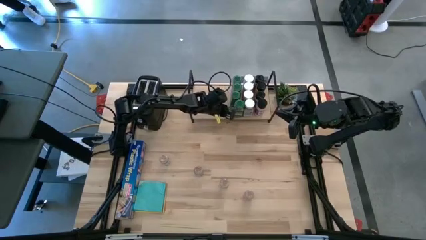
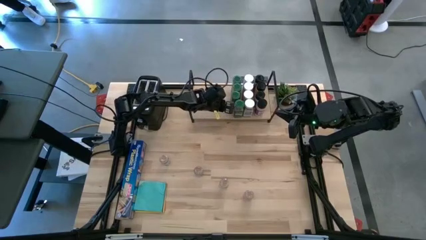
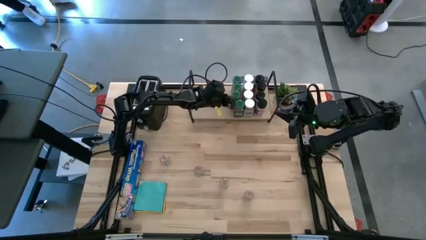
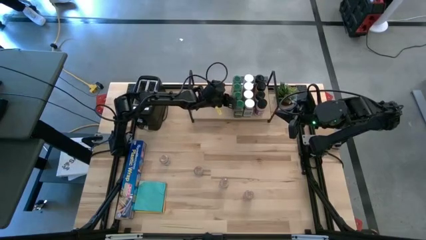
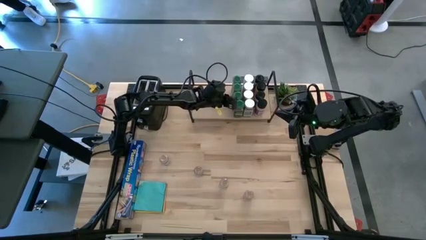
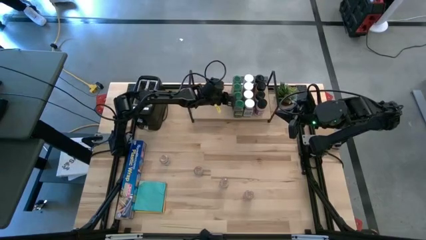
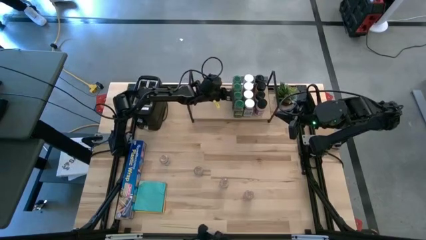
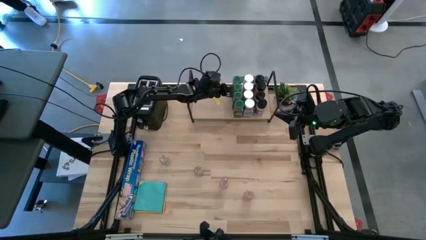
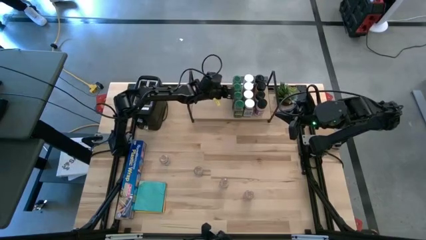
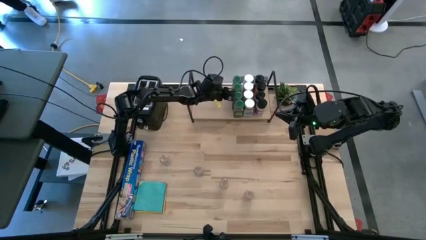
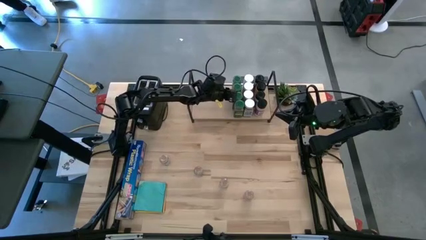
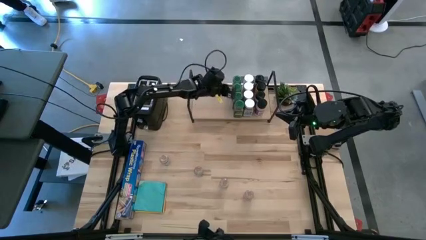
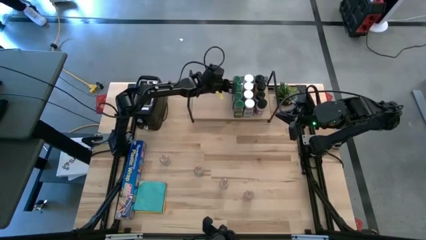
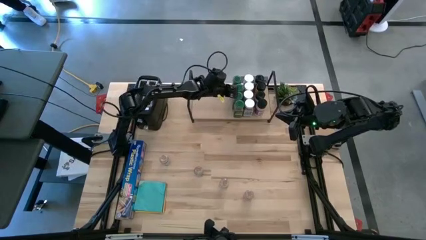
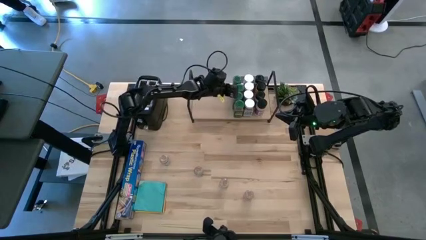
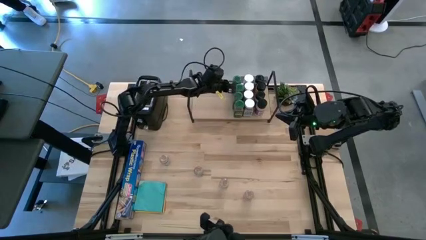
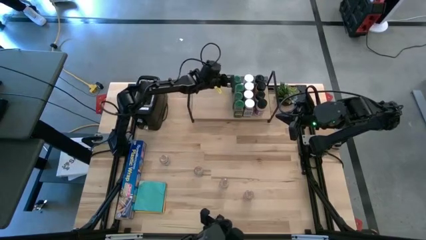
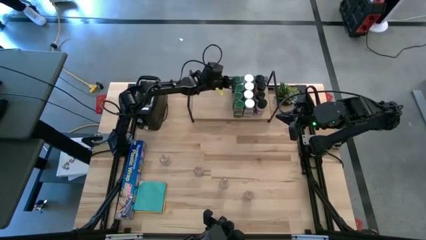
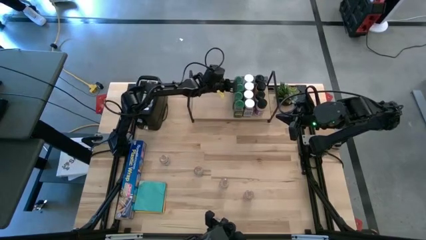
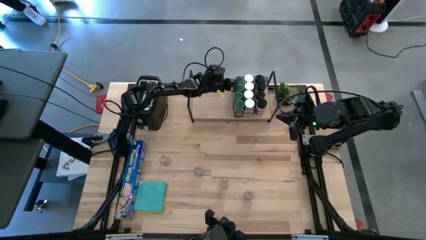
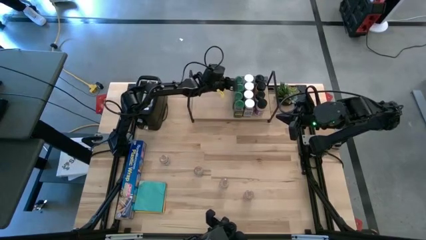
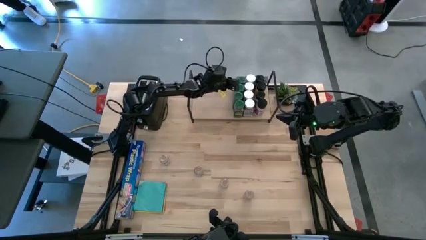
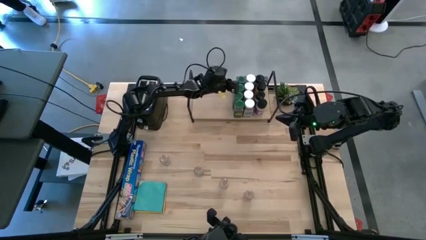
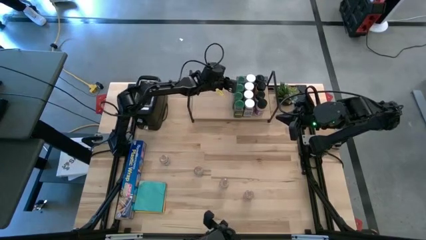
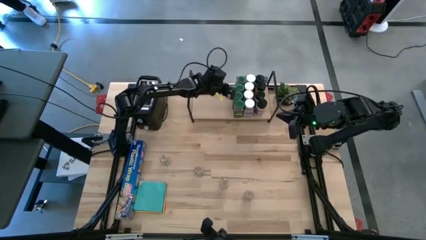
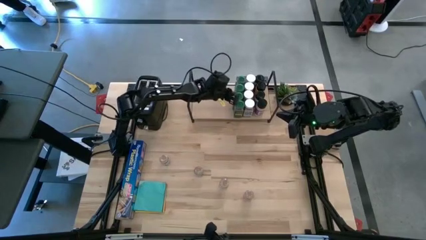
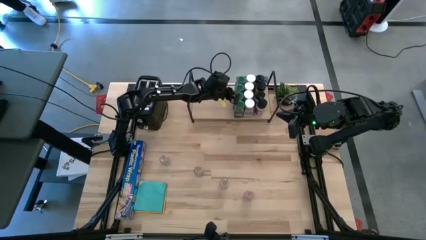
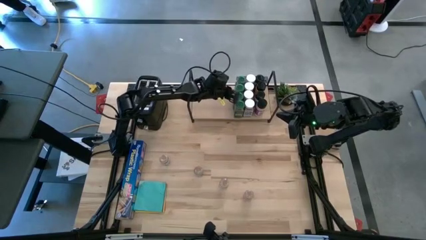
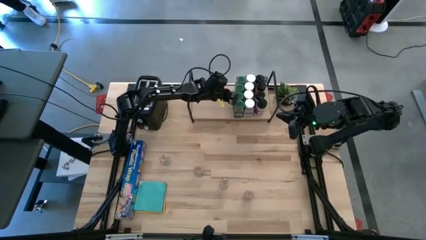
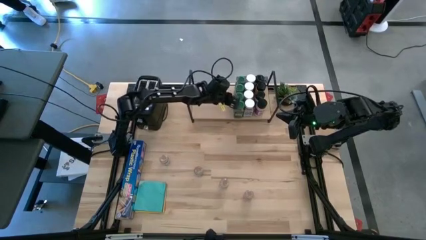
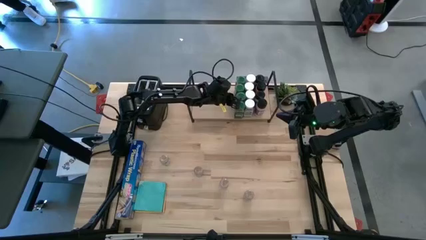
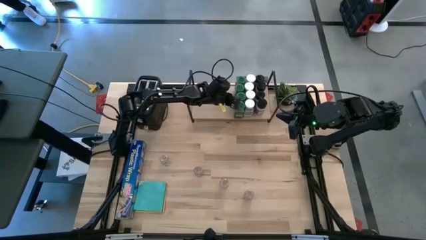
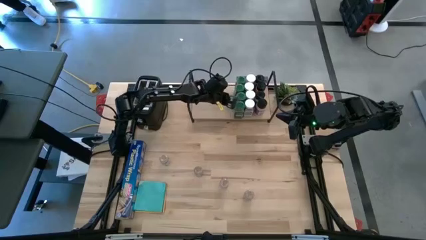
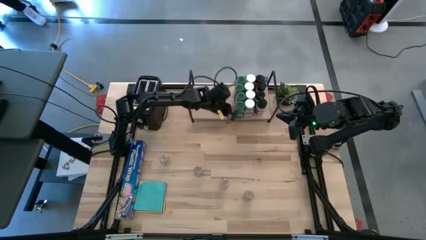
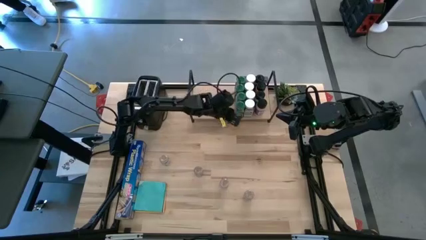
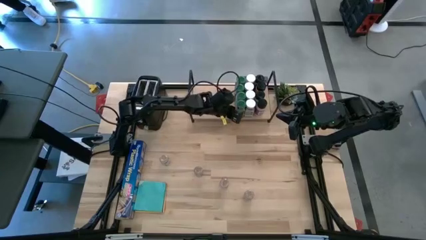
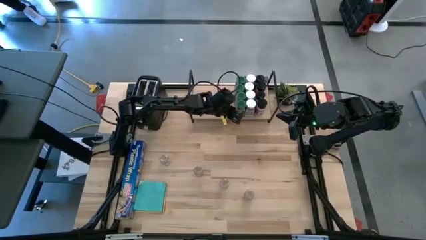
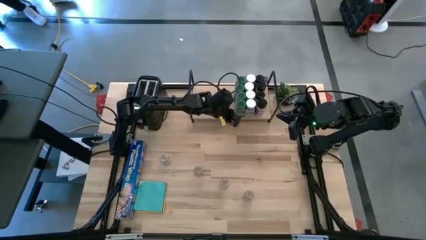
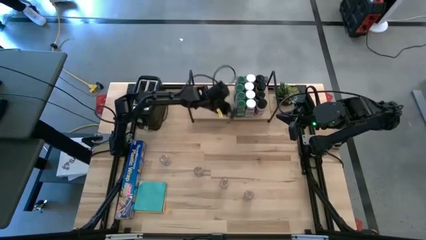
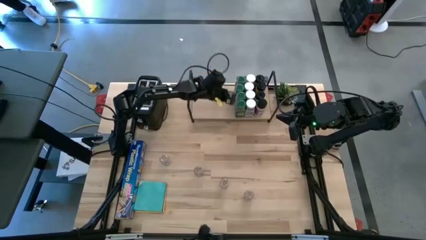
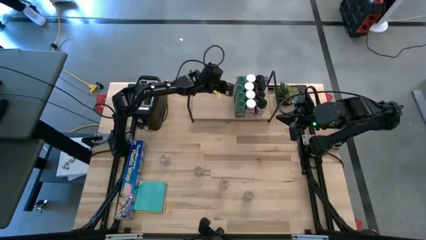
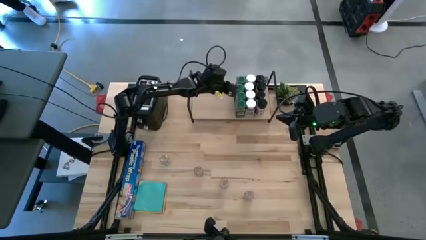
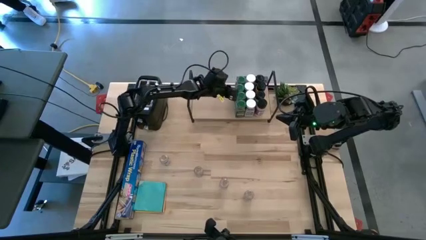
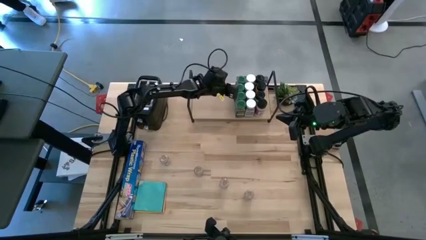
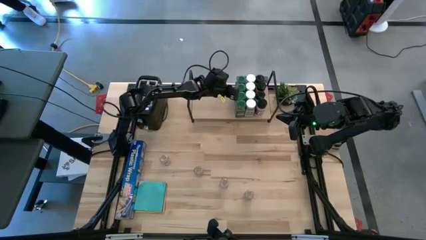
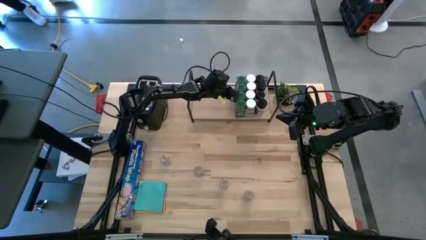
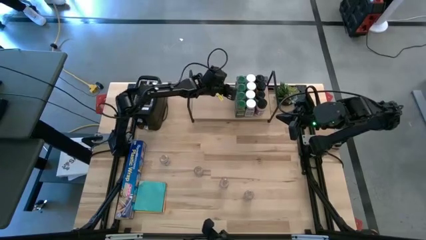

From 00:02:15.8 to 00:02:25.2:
Task: Shelf spices
Adjust the green spice bottles on the shelf

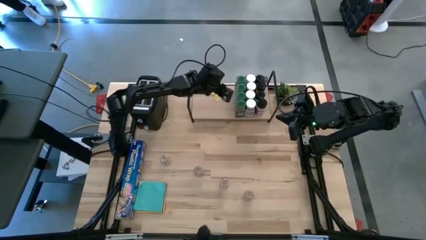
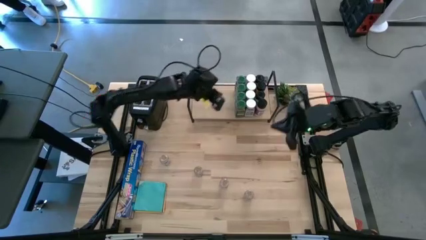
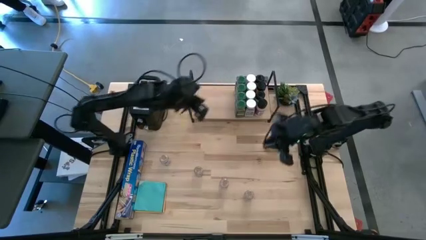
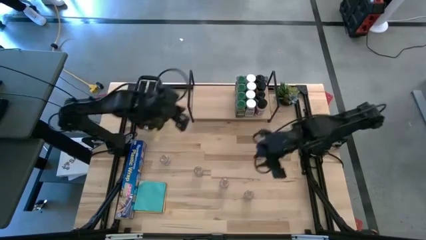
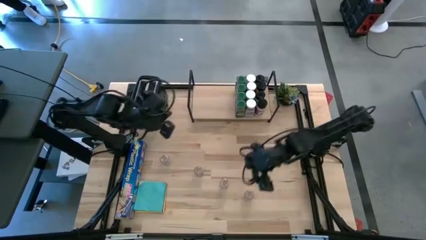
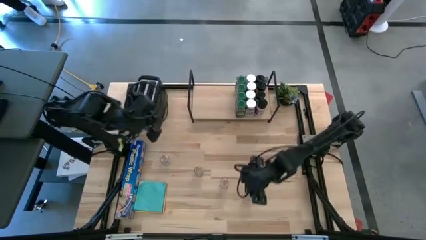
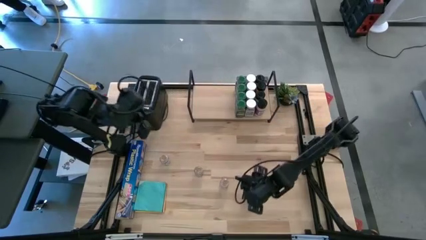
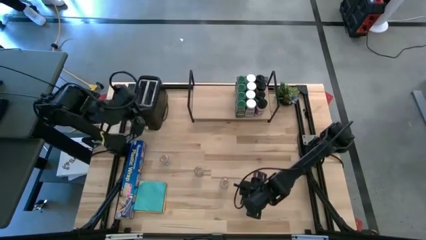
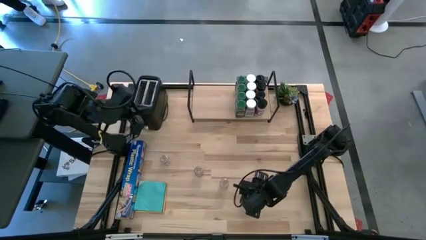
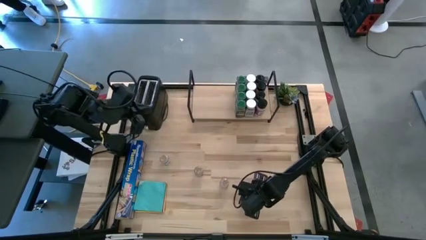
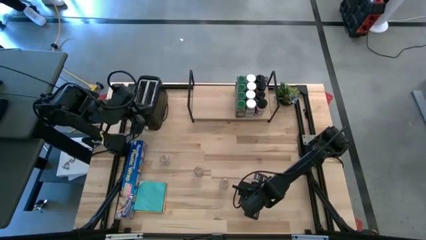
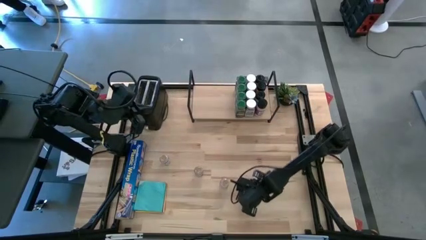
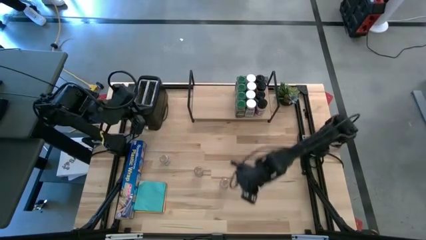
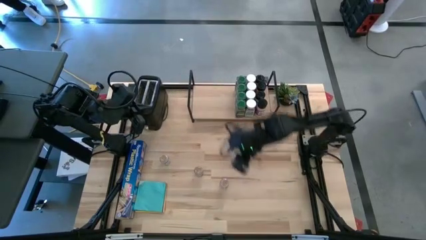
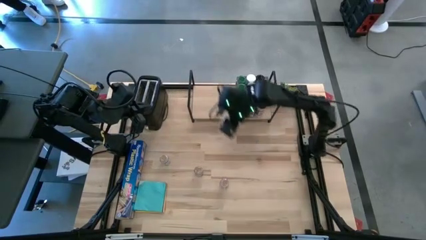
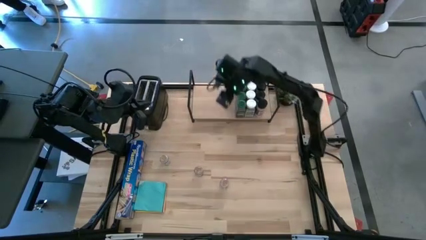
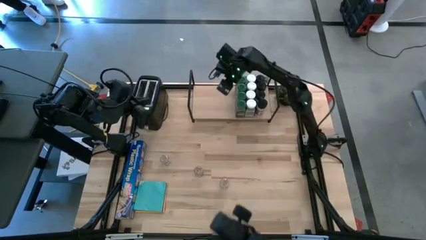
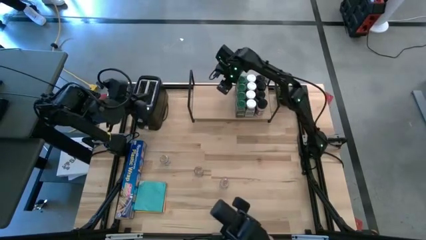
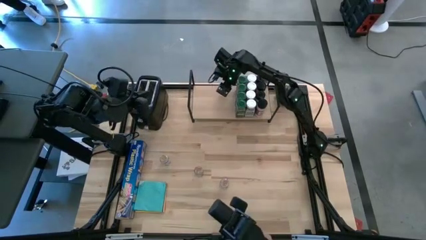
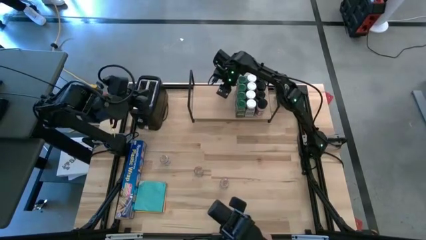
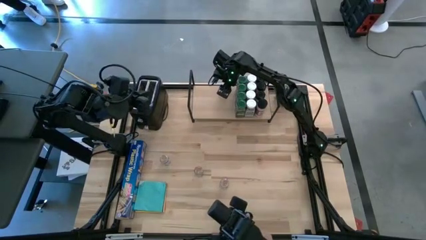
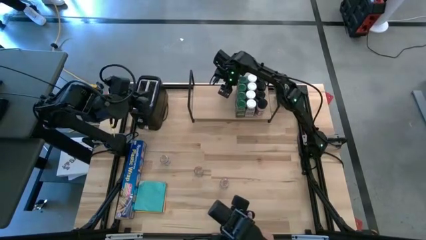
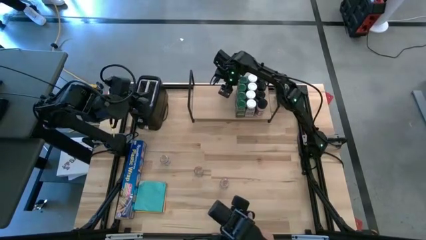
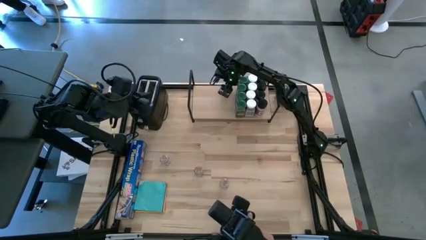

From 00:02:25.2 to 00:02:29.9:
Put the bottom brown spice bottle on the shelf

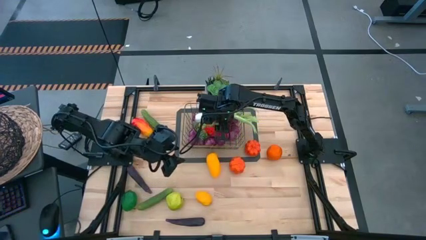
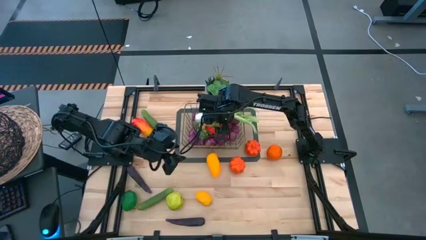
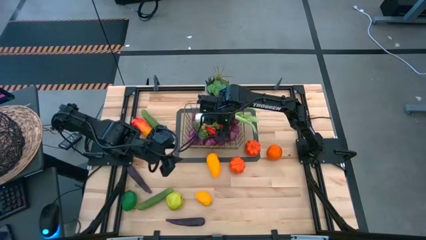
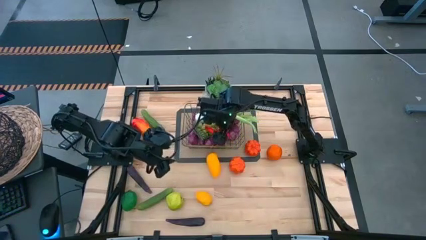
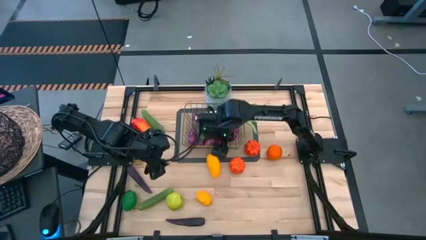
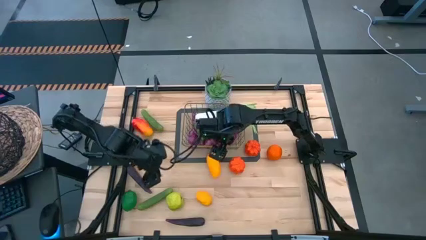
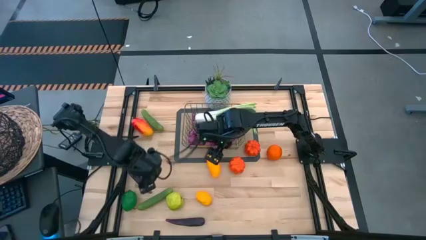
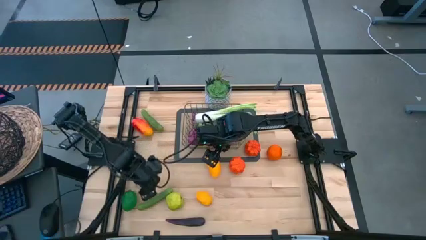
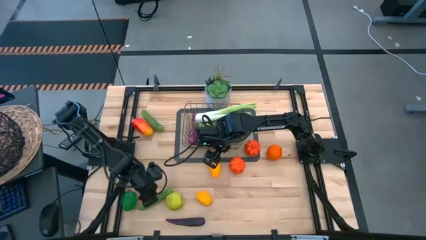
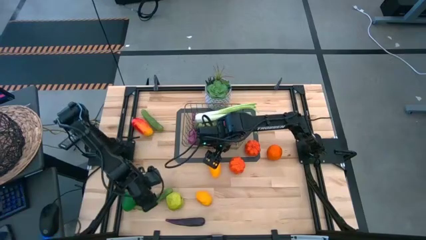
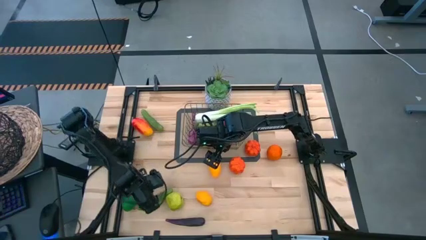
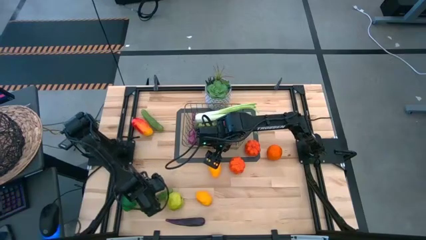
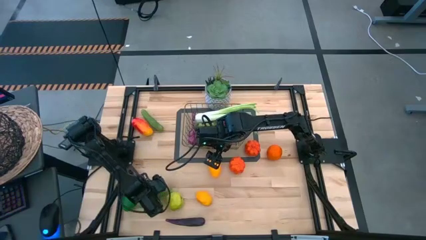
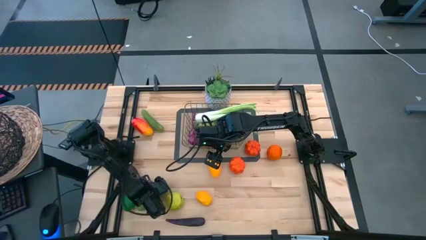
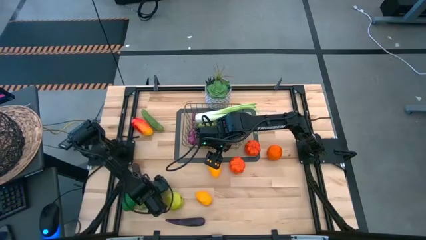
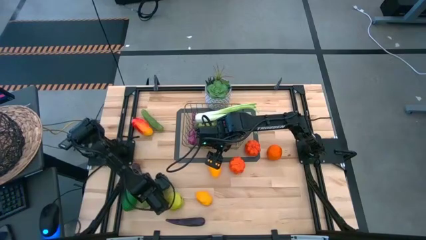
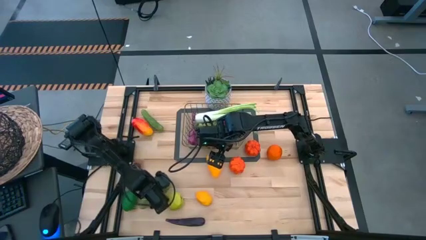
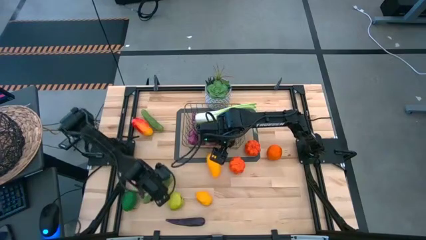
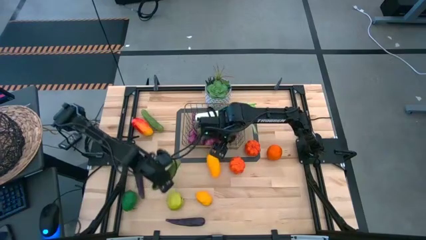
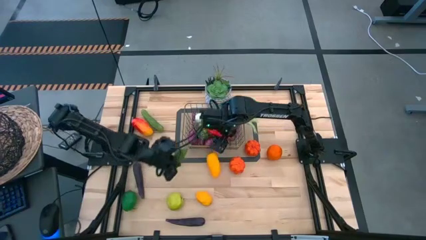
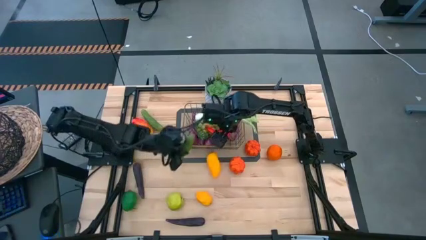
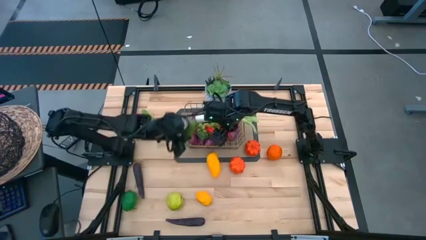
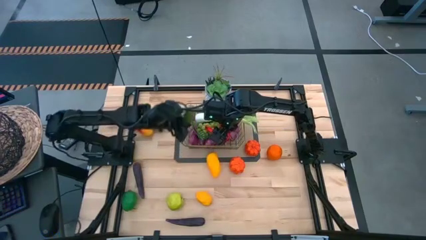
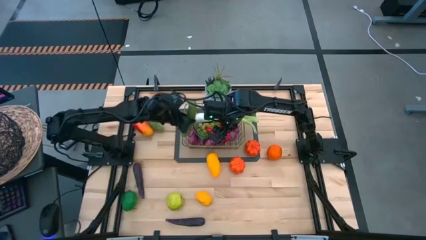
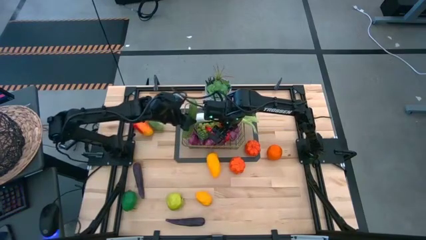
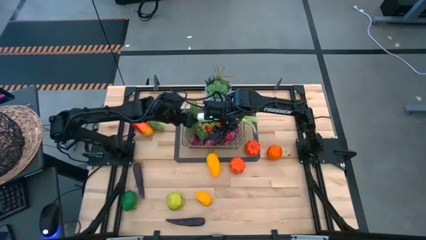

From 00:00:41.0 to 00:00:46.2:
Task: Build produce basket
Put the bottom cucumber into the wire basket
